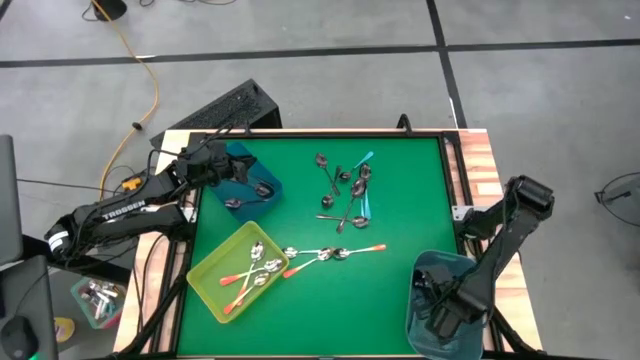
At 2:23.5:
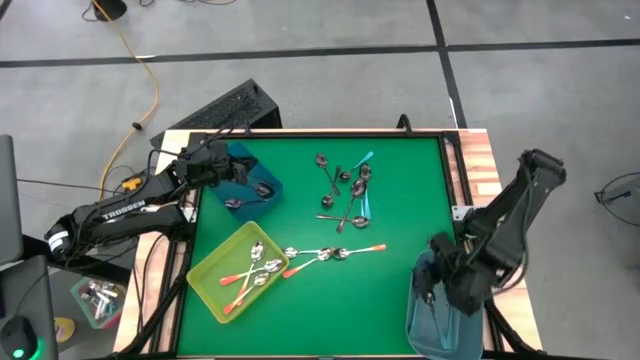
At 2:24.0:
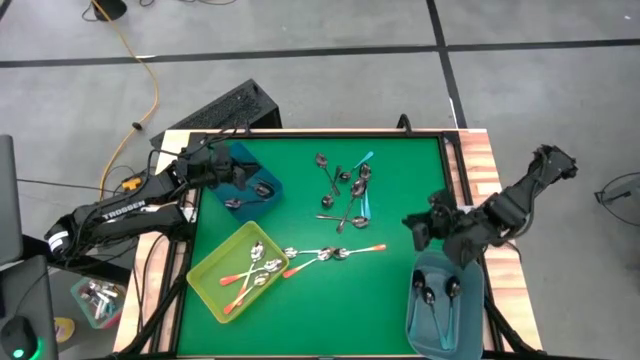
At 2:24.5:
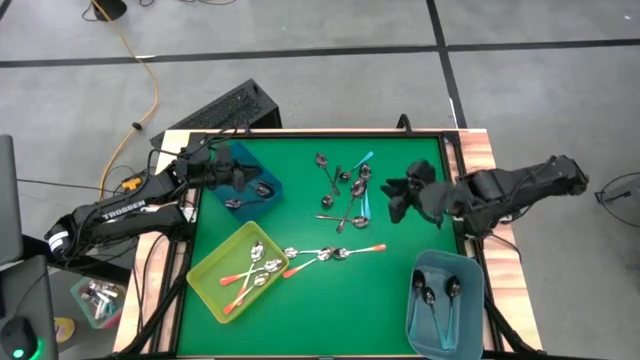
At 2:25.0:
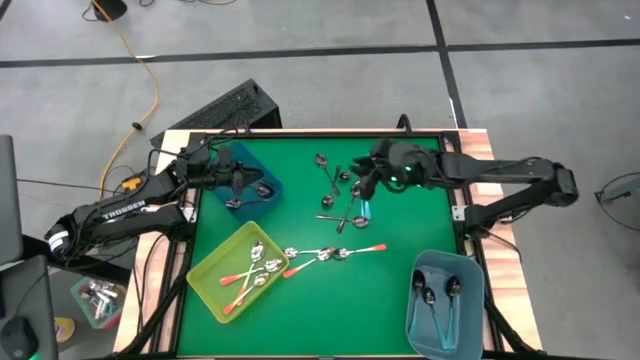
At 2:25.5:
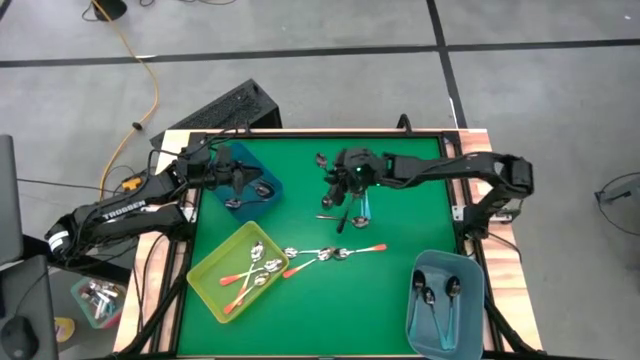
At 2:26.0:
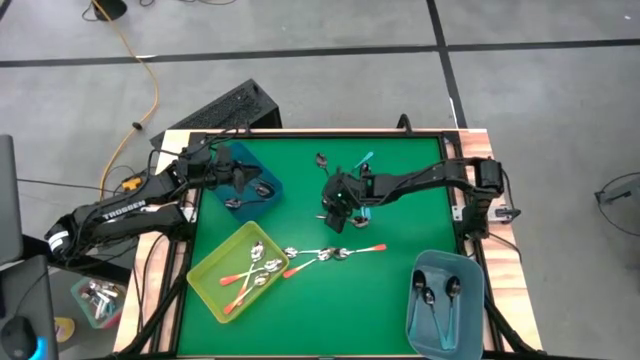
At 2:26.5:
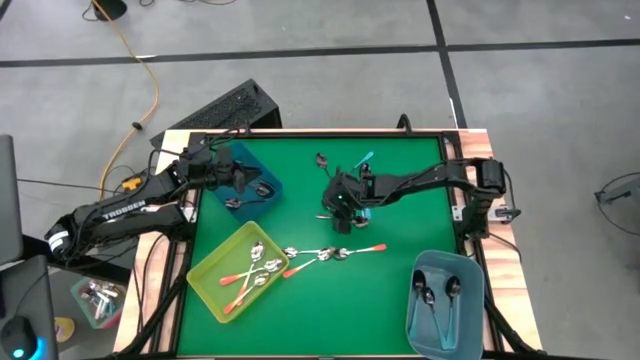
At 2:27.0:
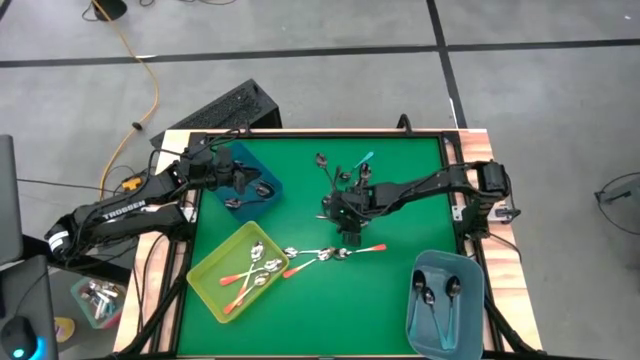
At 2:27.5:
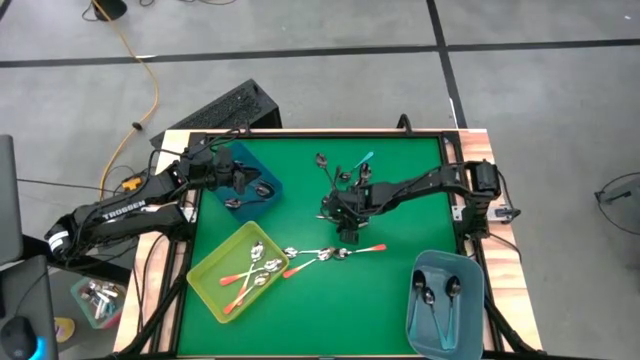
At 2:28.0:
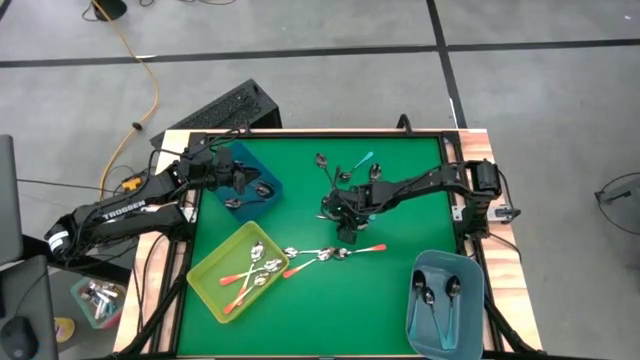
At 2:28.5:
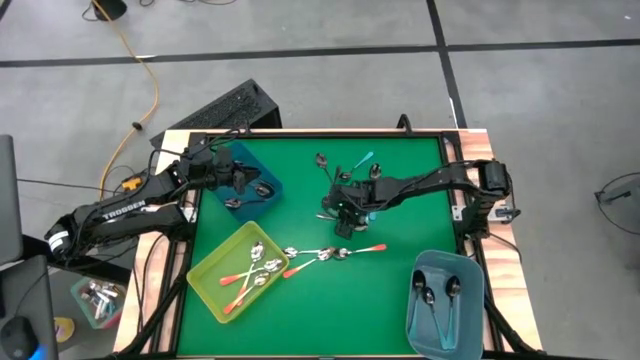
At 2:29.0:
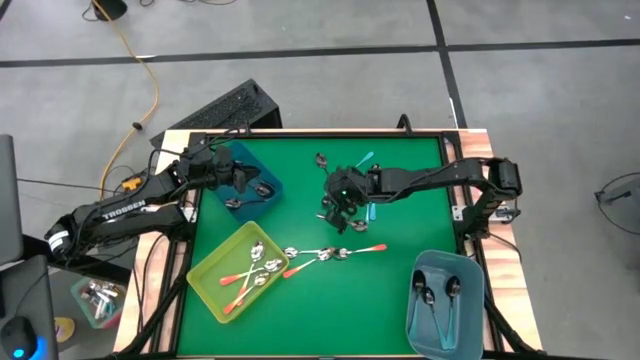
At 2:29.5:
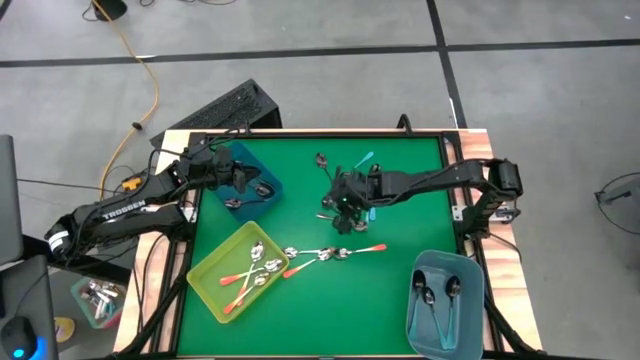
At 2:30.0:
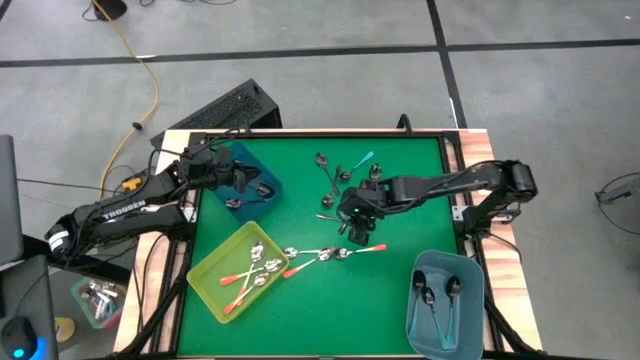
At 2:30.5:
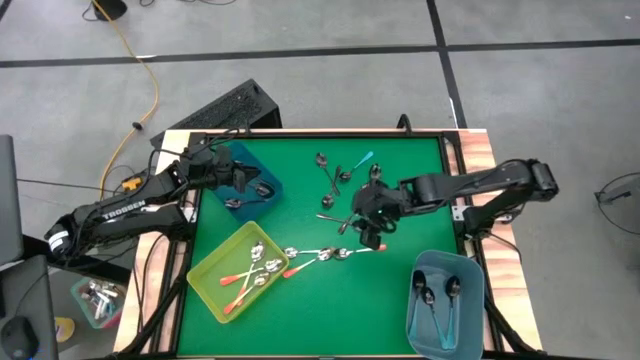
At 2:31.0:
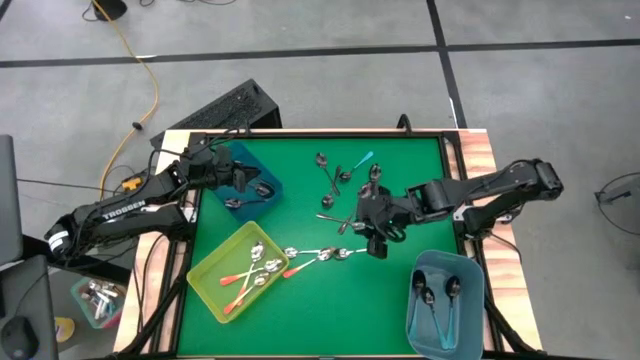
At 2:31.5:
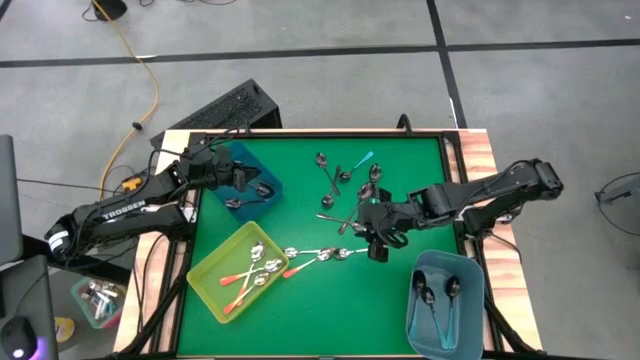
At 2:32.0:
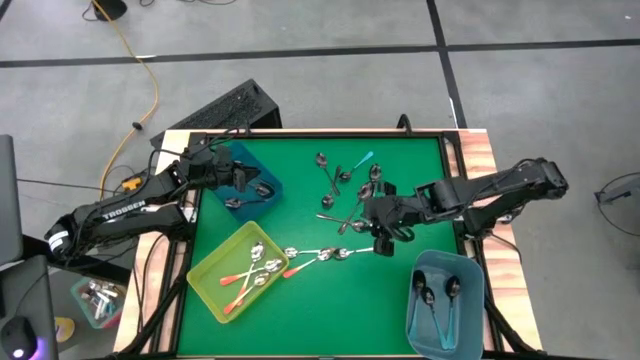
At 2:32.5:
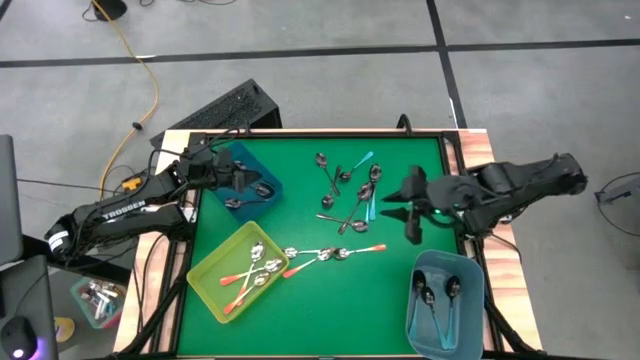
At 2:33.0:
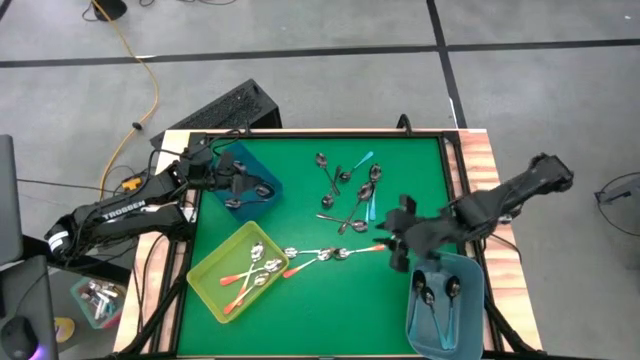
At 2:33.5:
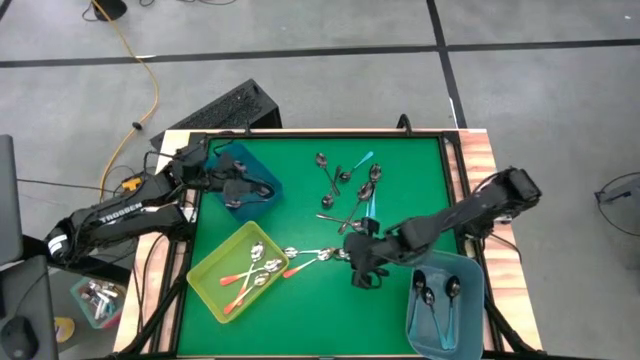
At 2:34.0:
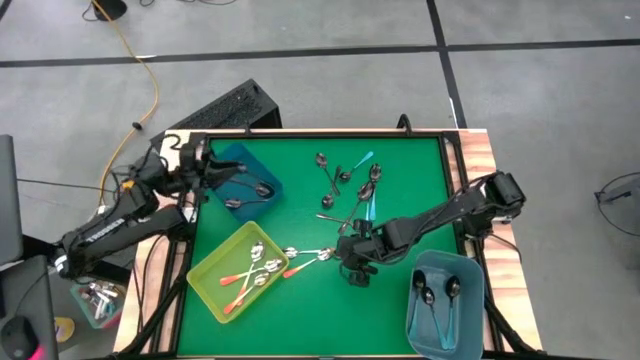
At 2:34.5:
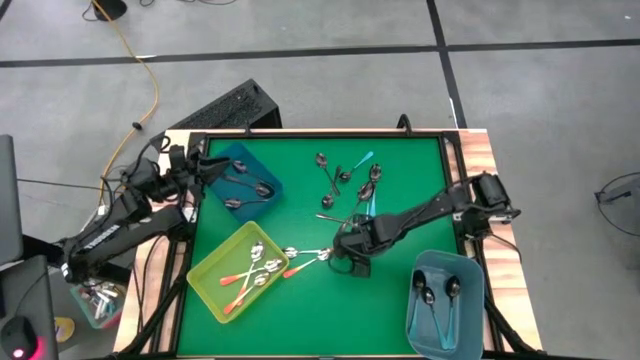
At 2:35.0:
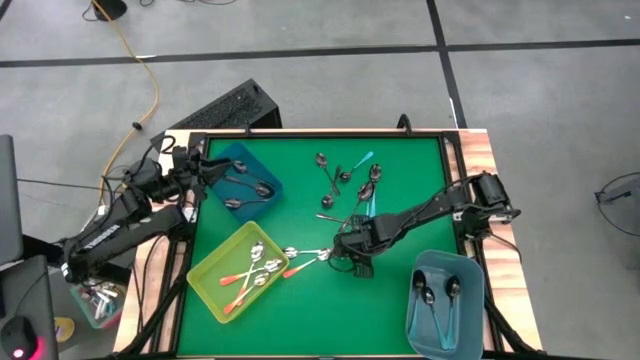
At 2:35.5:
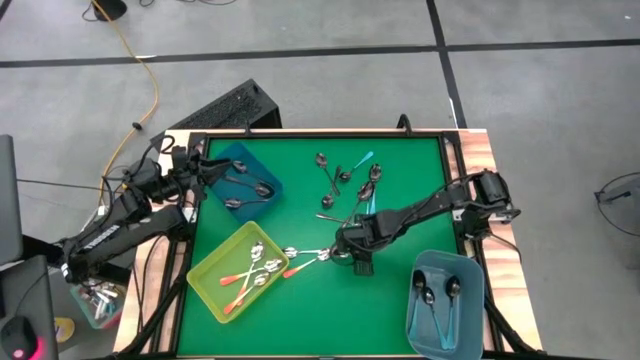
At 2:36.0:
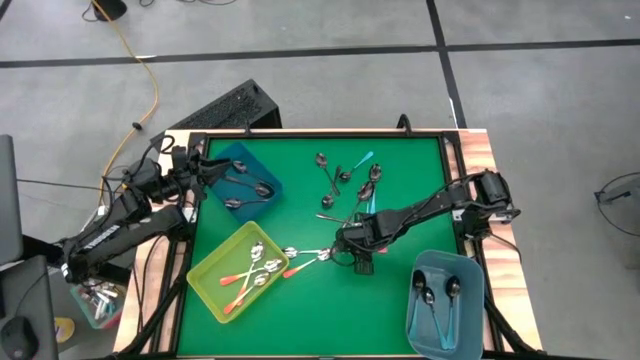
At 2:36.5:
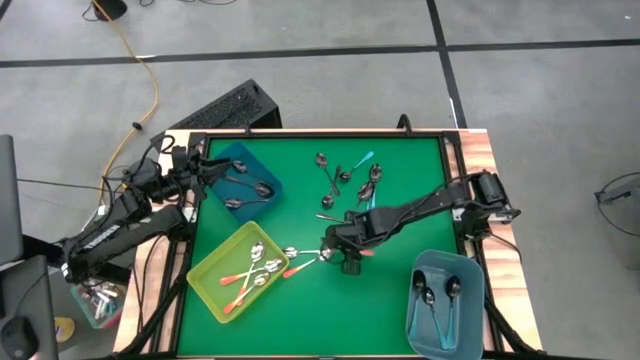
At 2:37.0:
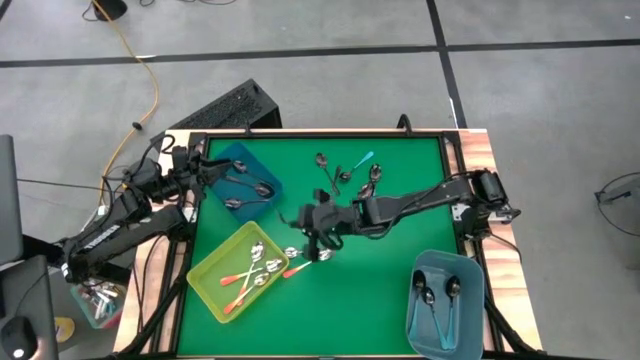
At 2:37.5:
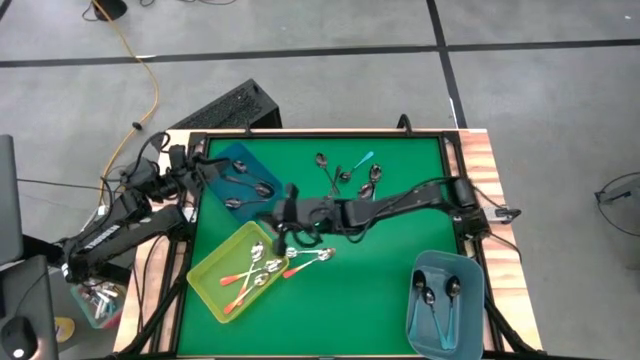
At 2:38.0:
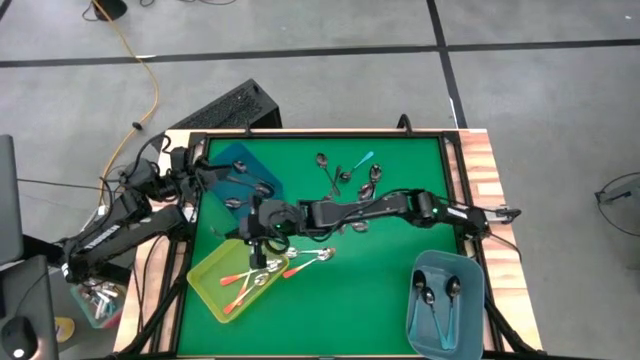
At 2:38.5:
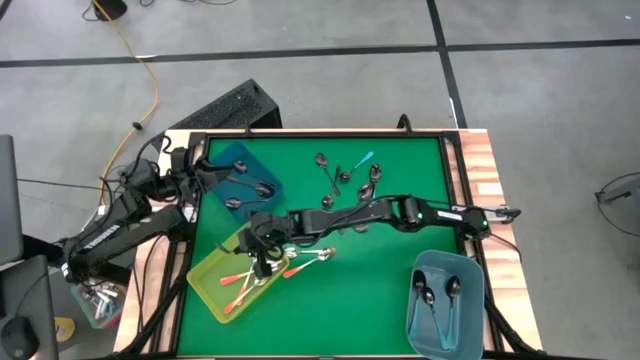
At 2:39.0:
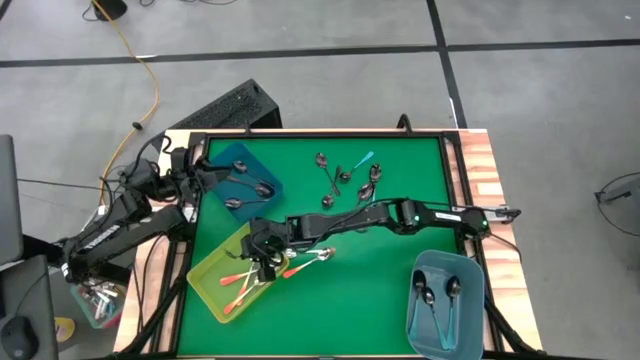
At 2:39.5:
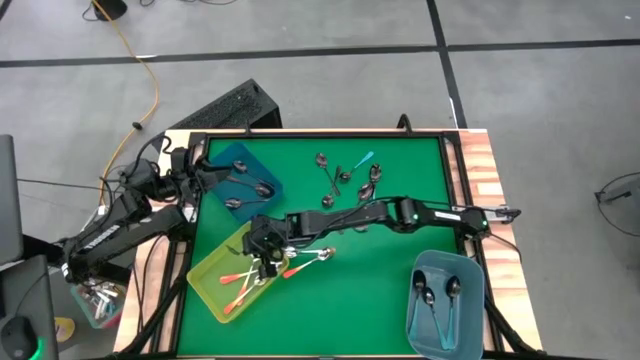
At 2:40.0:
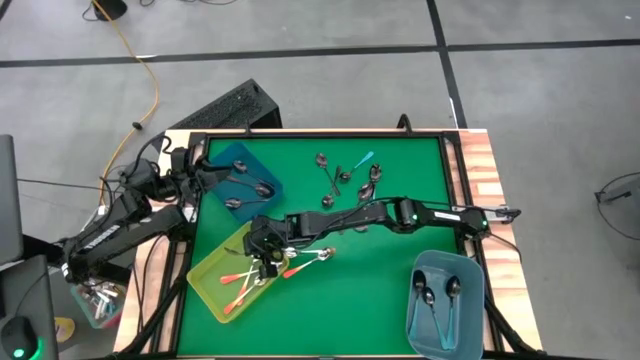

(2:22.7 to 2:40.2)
Task: Sort silverware by color (type)
Put the orange spoon into the green bin

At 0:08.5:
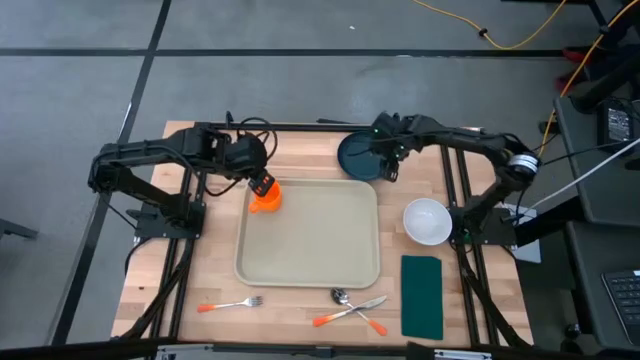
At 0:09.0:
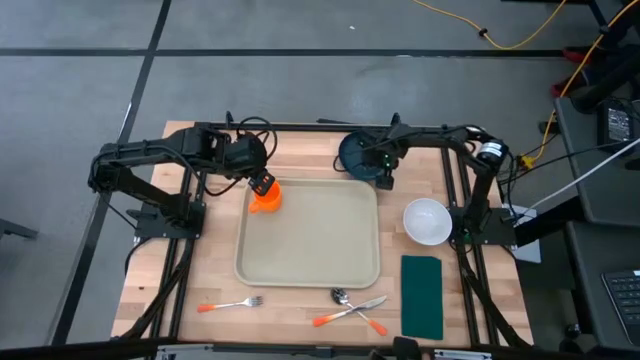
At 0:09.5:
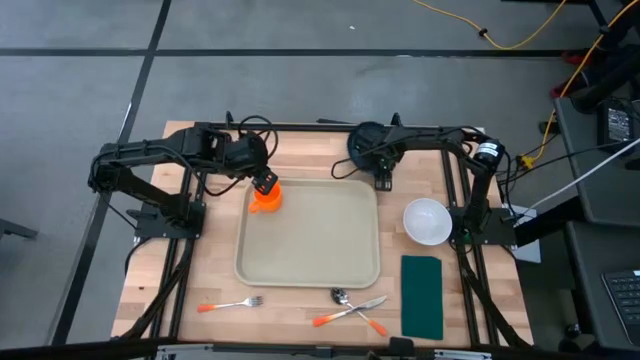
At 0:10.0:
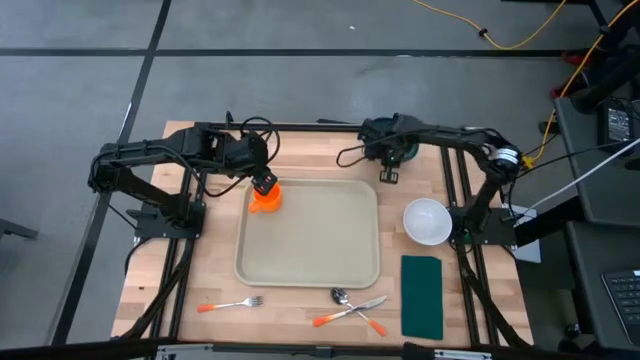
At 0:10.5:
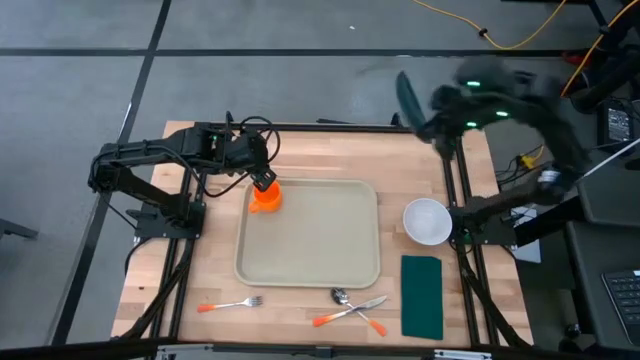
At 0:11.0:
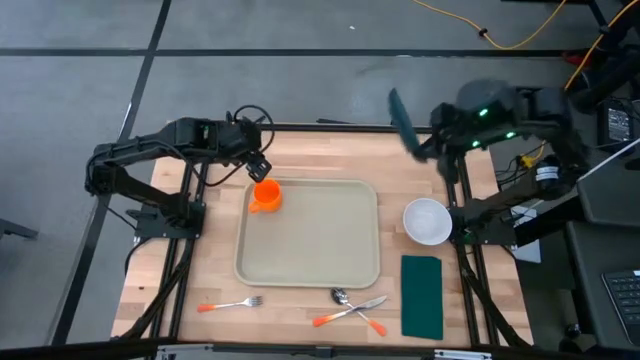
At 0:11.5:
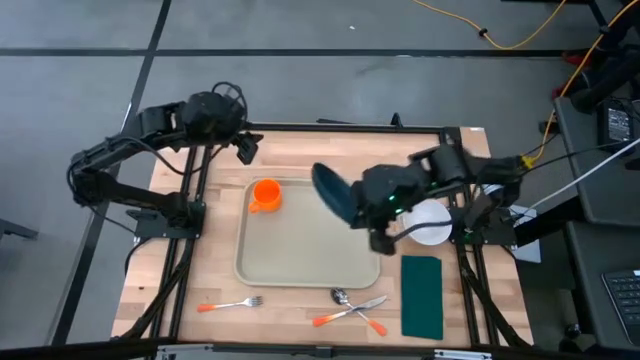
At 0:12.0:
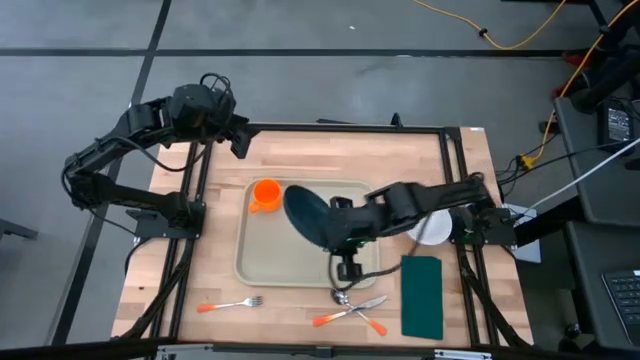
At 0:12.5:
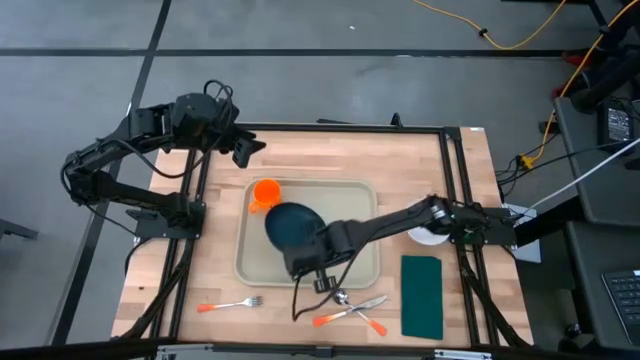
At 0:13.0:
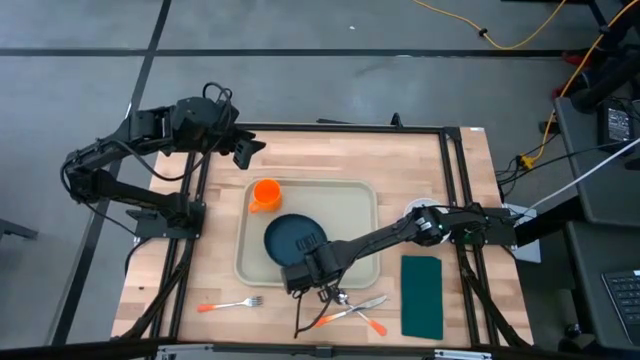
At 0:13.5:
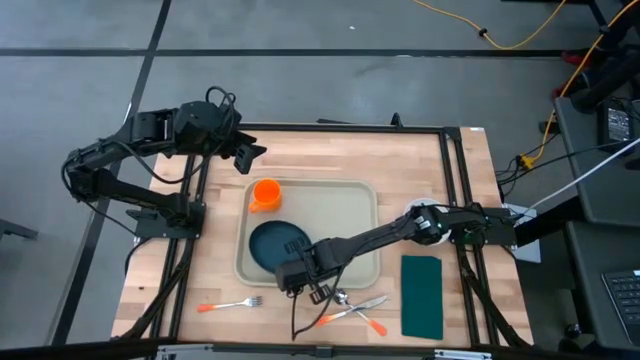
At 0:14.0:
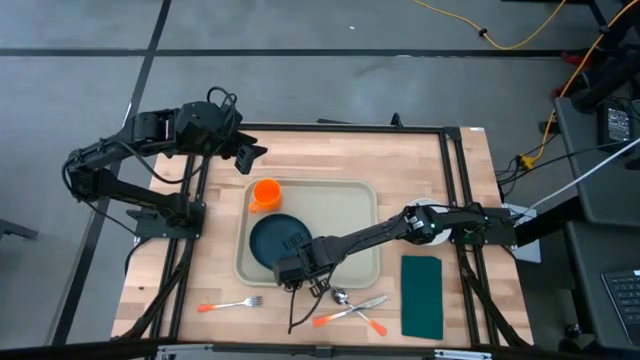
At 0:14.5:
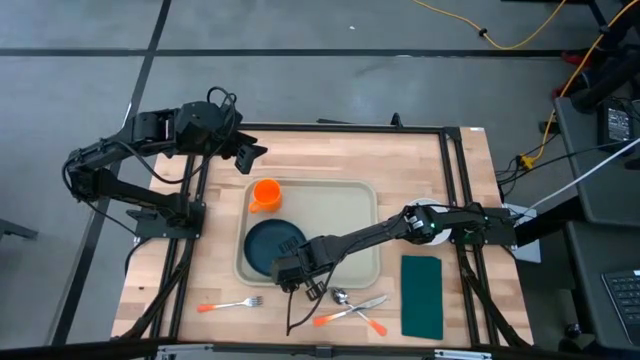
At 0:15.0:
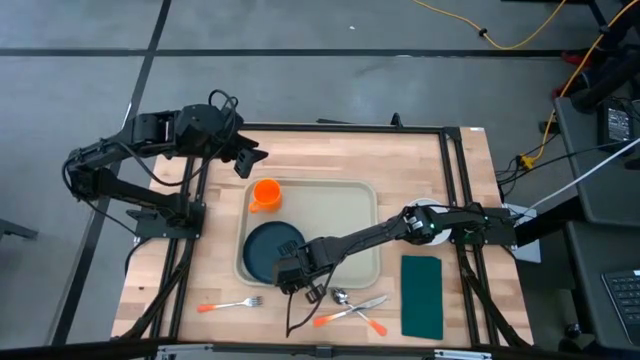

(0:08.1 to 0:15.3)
Task: Set up tray
Put the dark green plate on the gray tray
